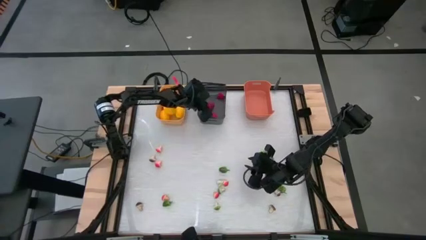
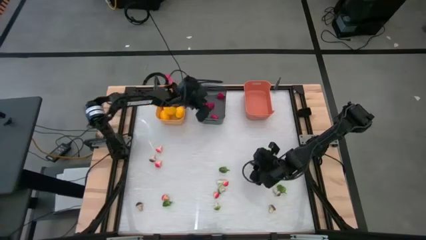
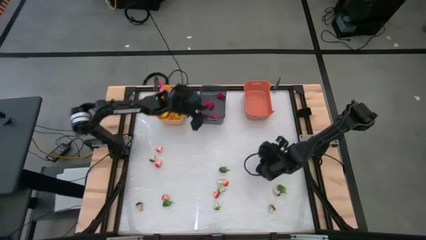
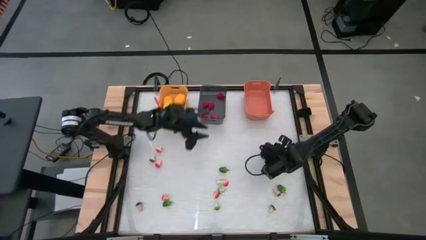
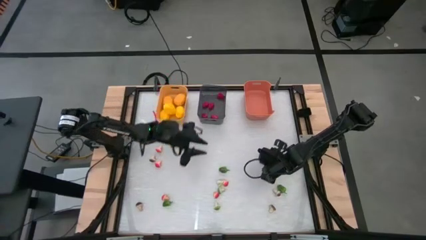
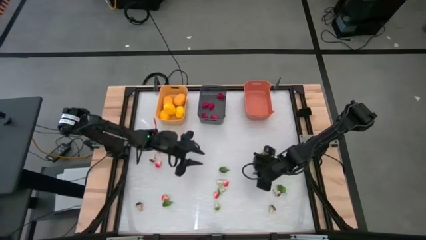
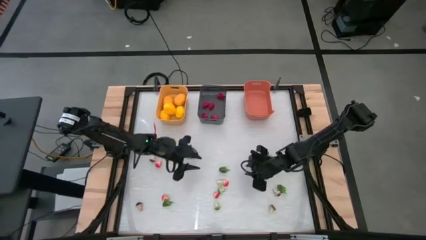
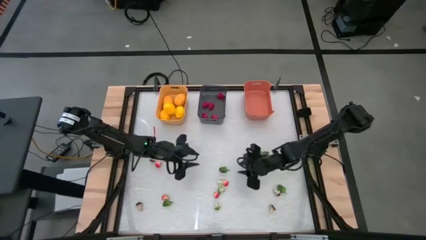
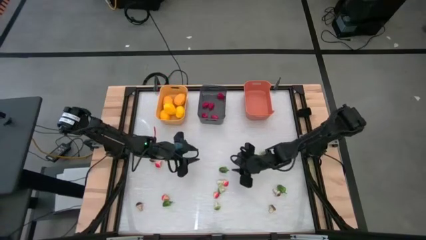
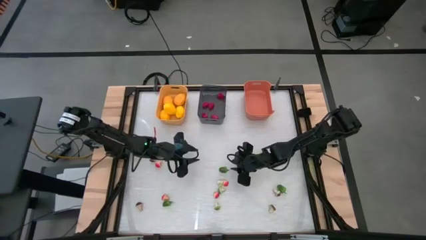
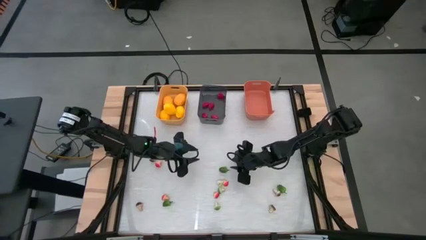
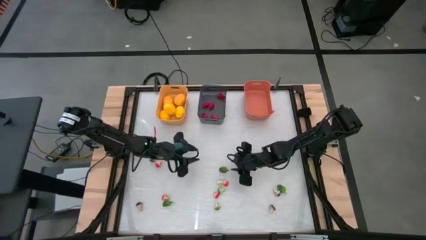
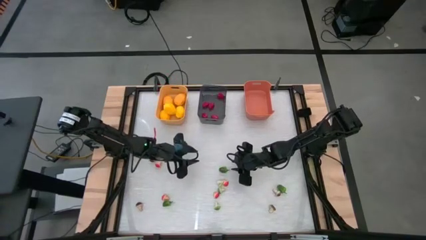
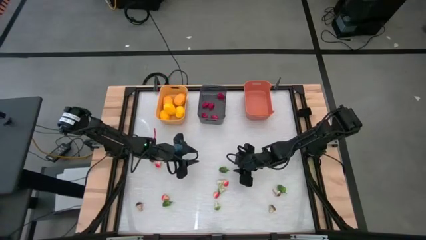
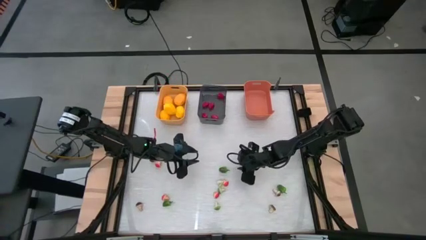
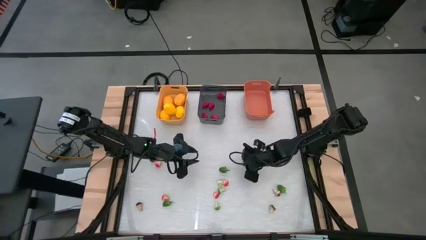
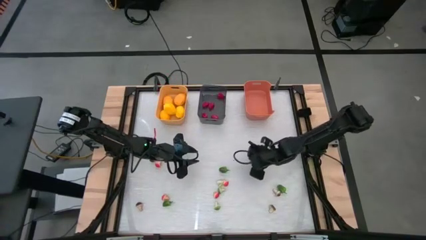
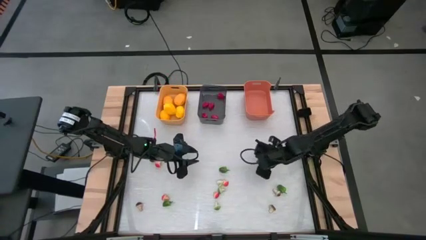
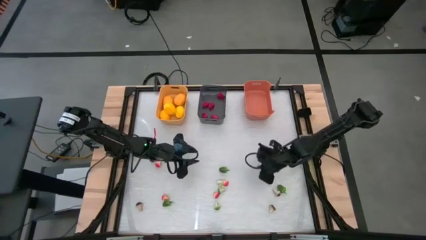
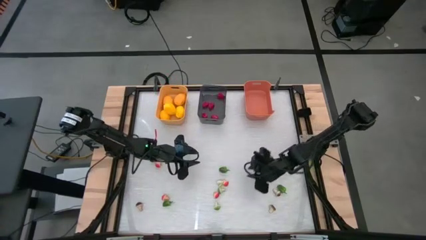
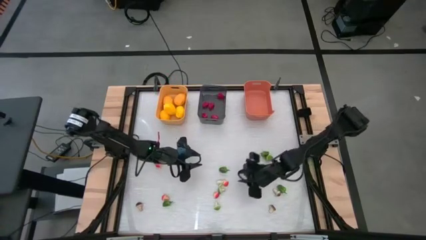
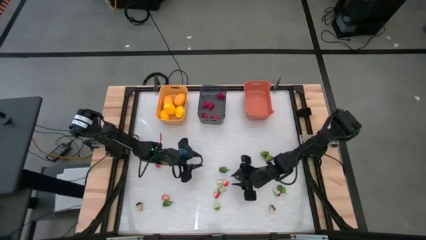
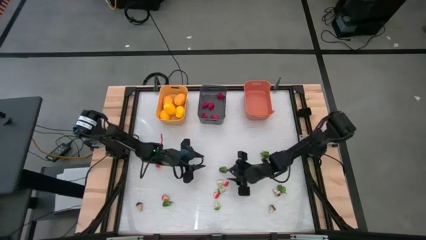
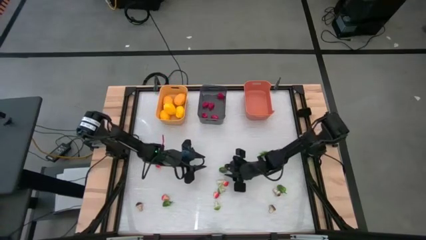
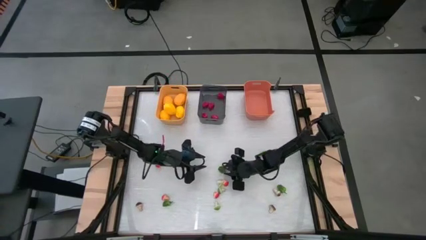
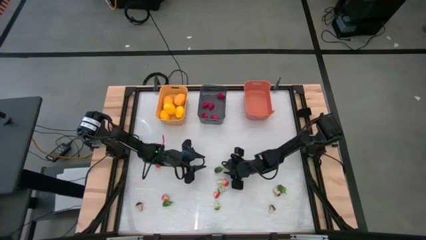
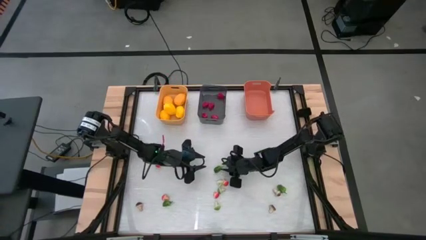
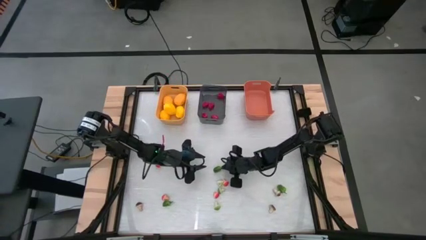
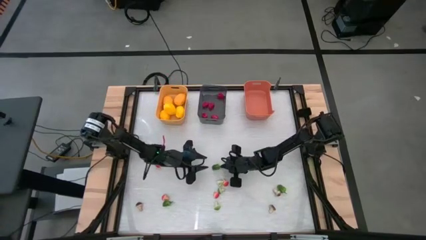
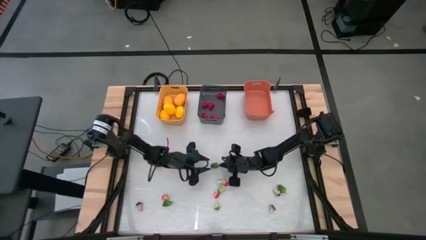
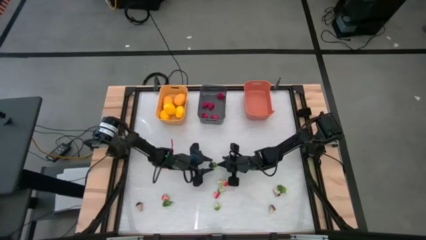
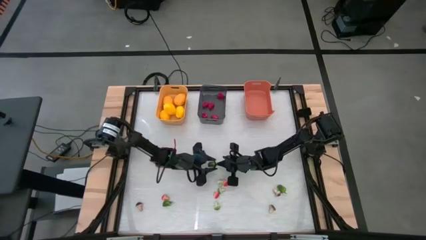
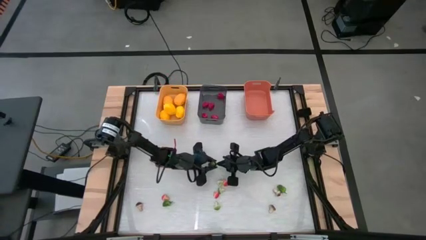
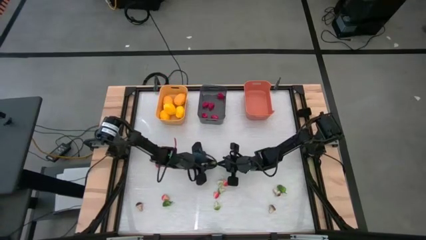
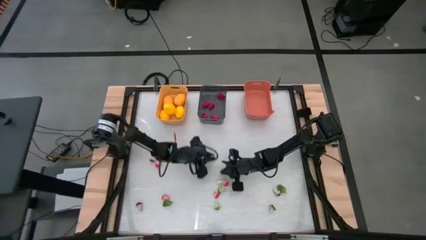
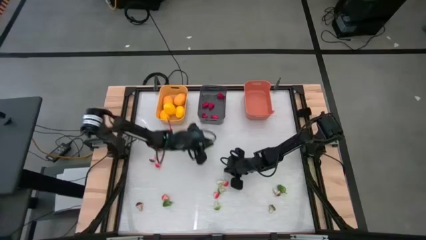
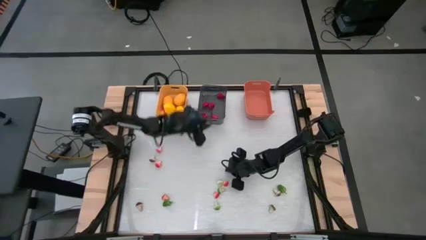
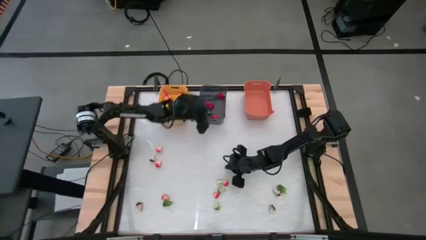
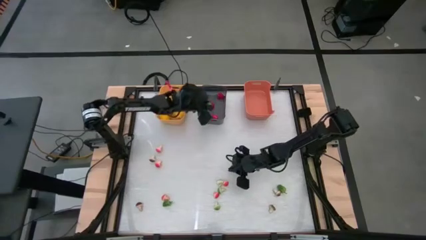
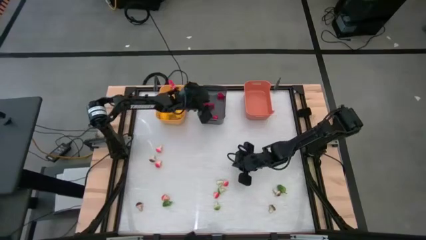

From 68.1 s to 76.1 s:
Task: Sort produce into baskets
Put the green chili pepper into the black bin

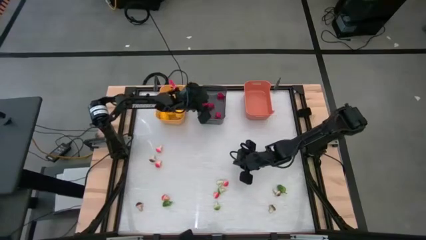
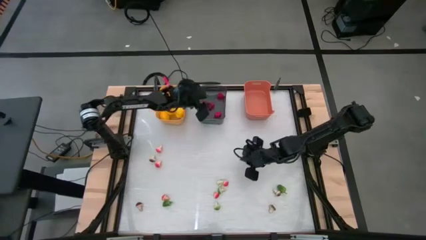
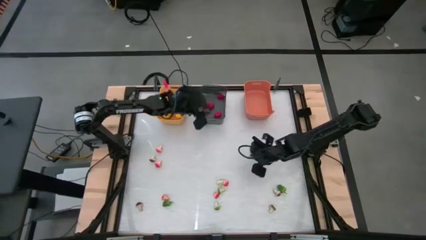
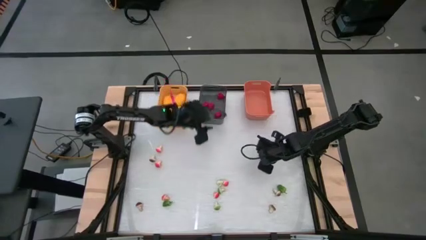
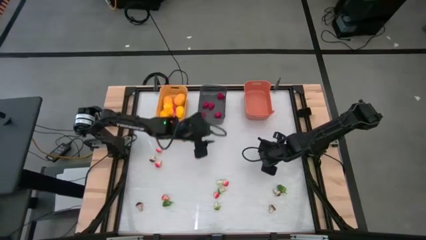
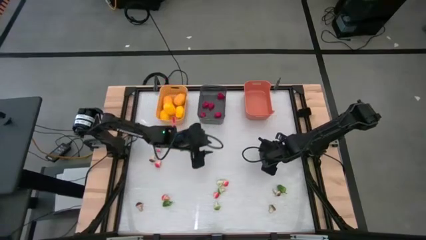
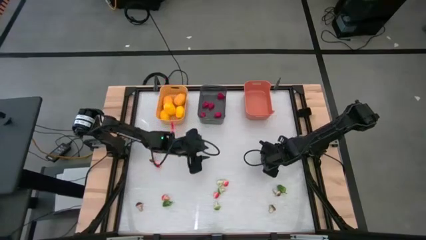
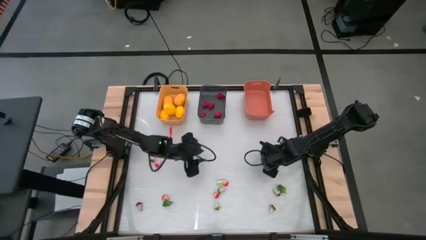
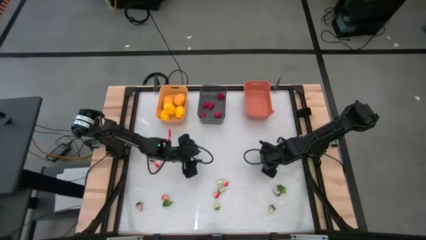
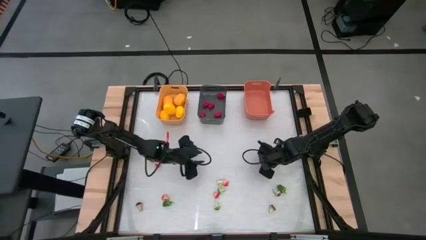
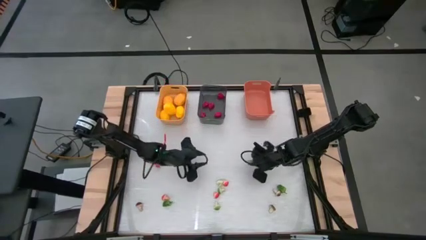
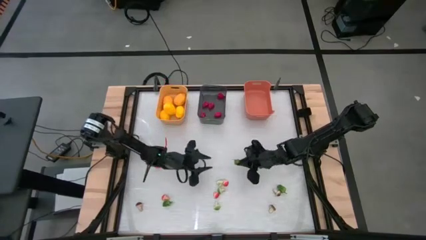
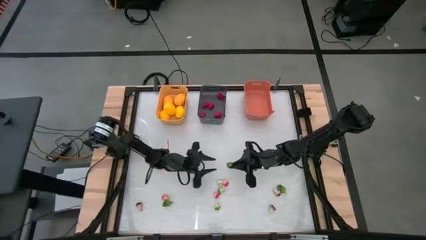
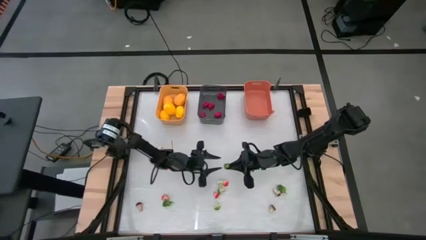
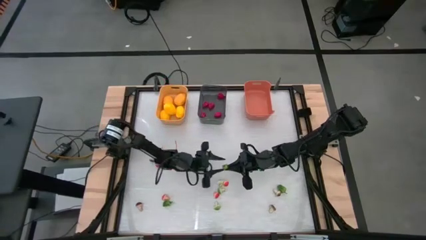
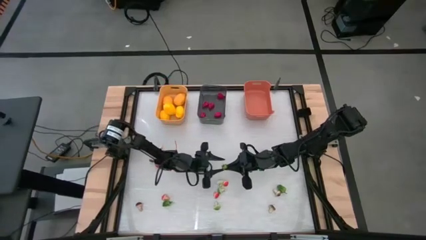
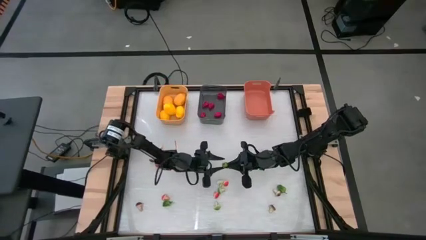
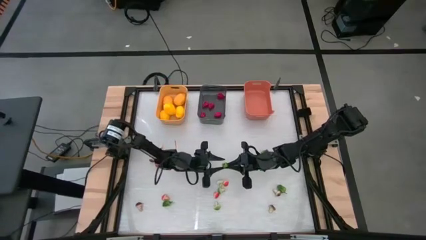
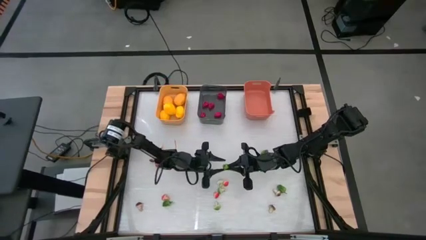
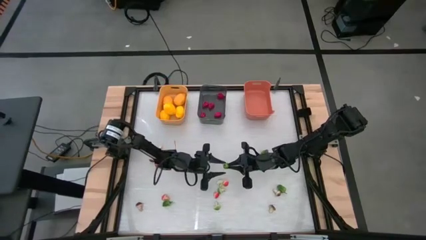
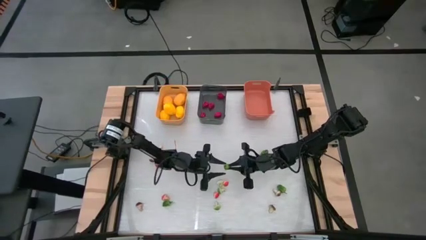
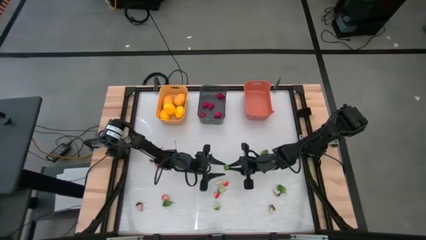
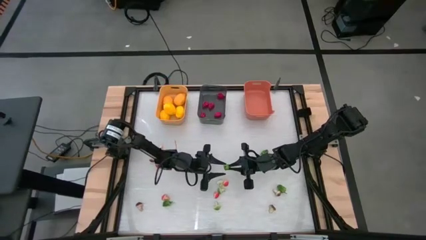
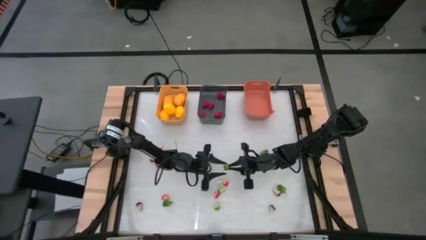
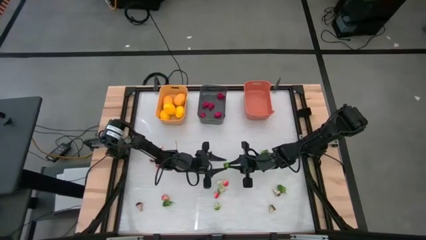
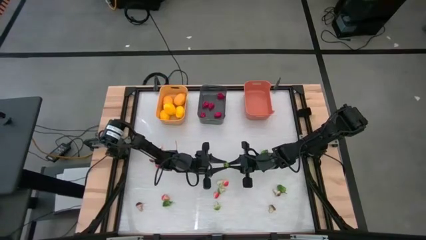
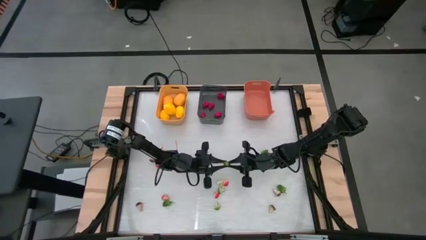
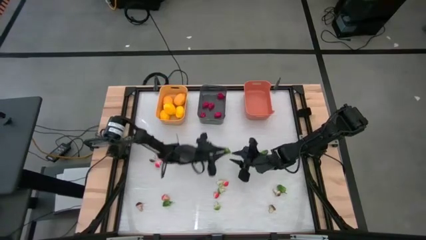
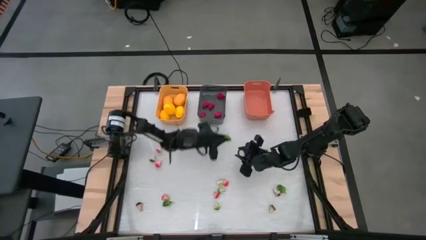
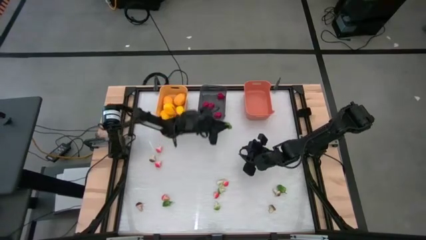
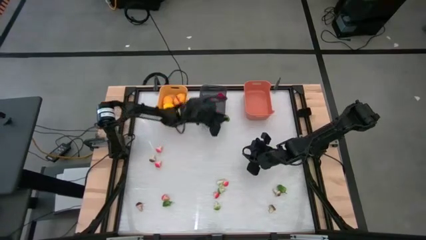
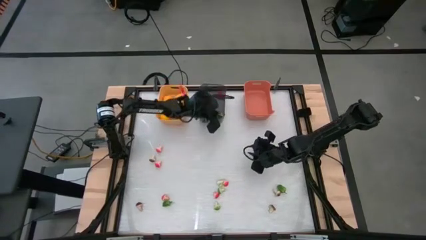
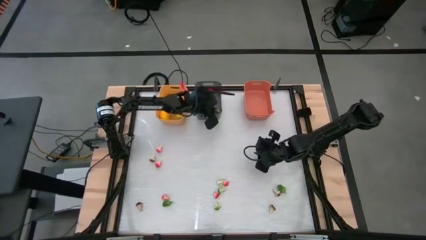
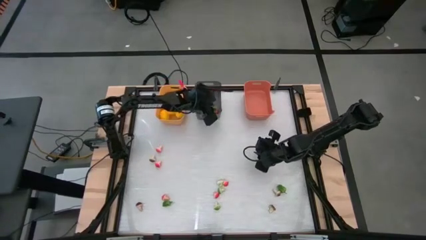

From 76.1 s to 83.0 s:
Put the green chili pepper into the black bin

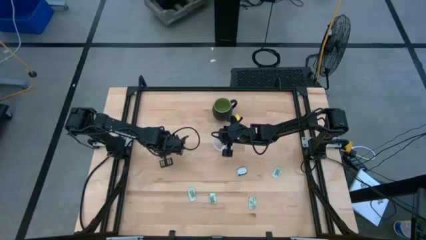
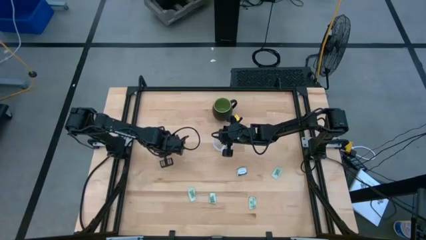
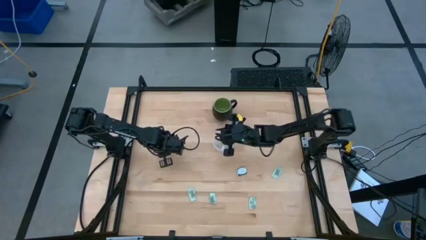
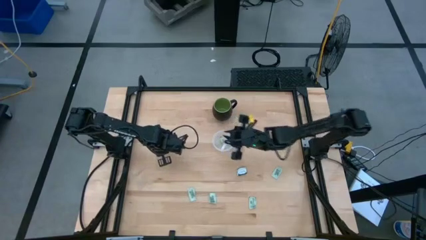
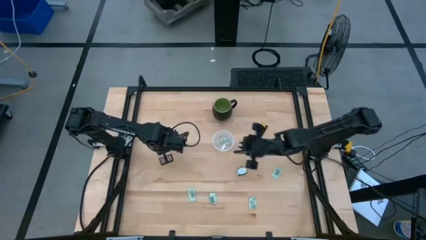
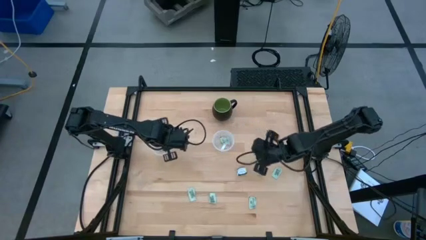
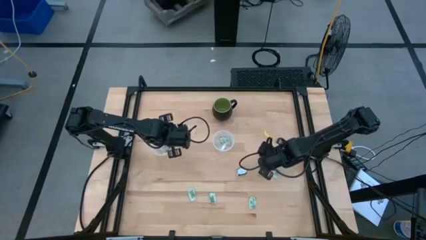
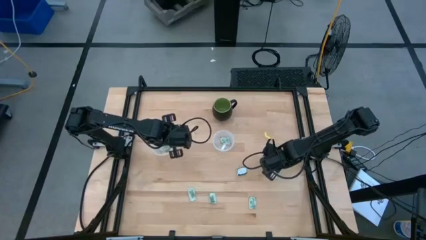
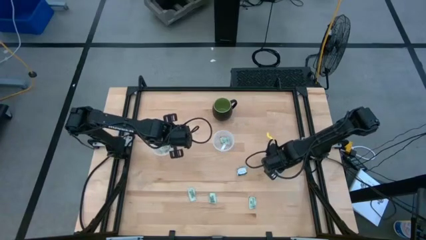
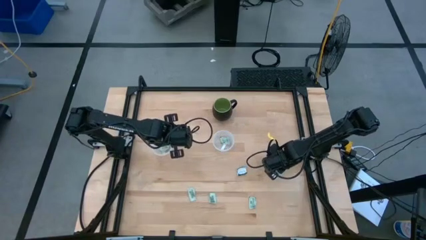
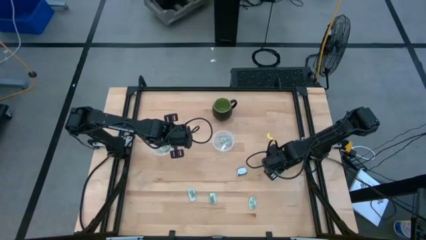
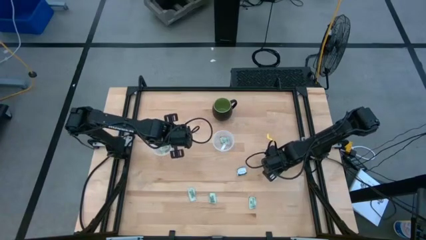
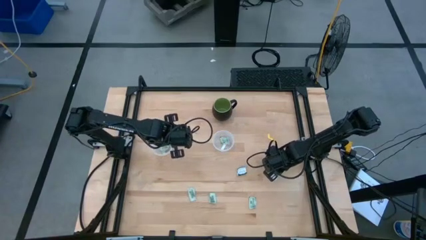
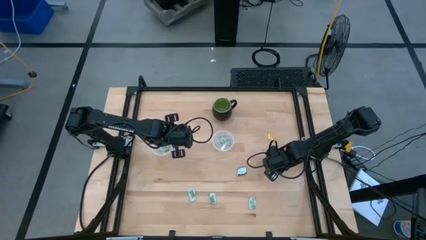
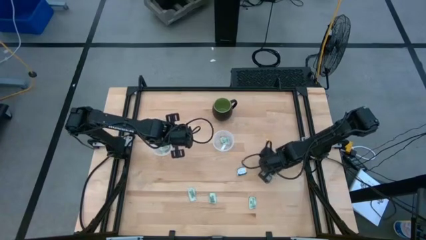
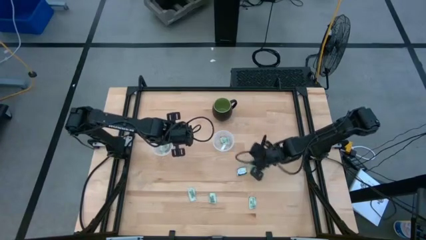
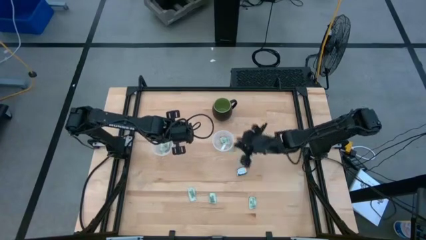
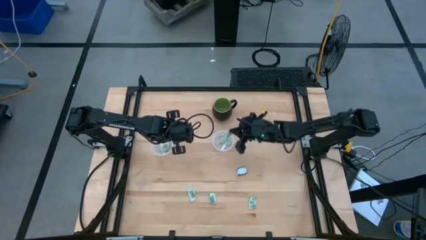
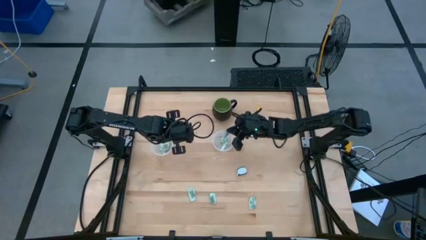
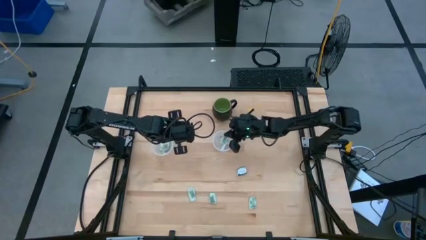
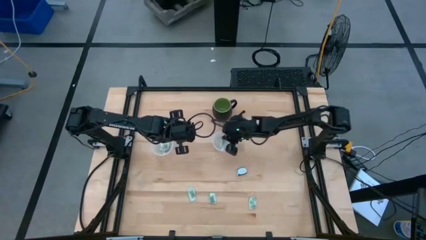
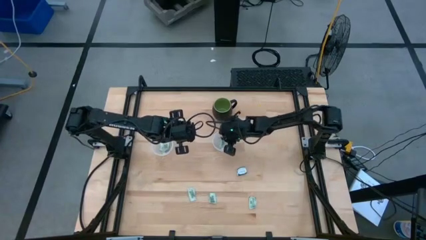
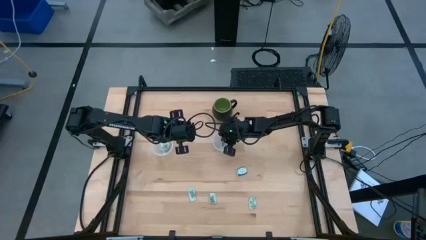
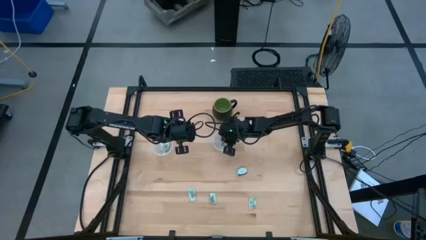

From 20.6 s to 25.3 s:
Task: Pick and place Stevia / Truvia into bins
Put the white stevia packet into the right transparent container
